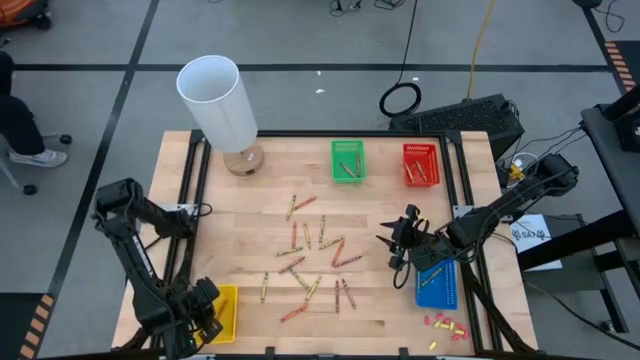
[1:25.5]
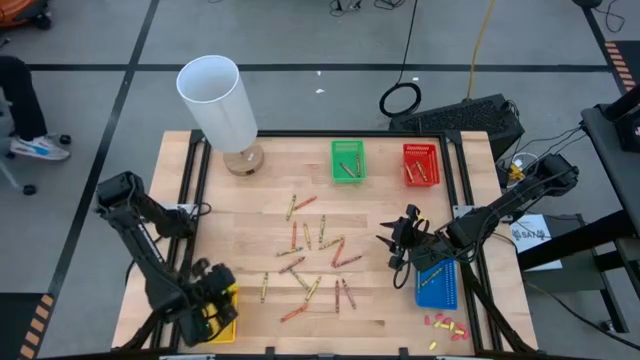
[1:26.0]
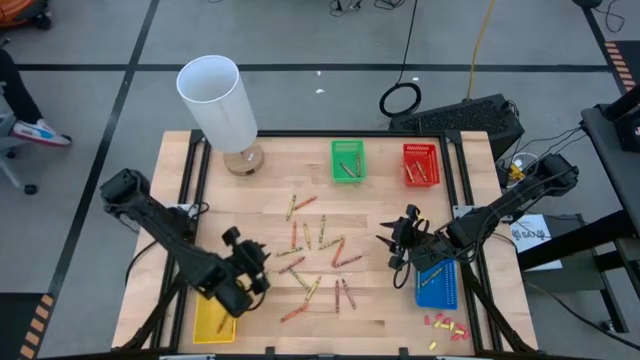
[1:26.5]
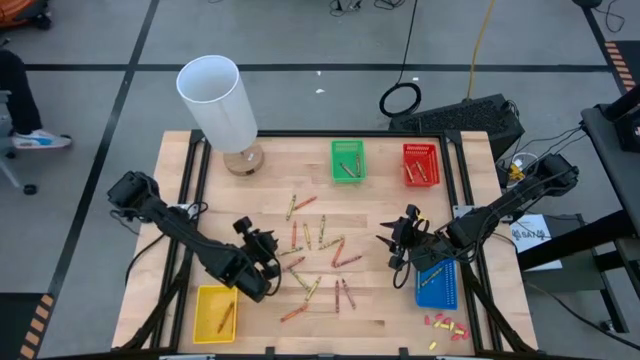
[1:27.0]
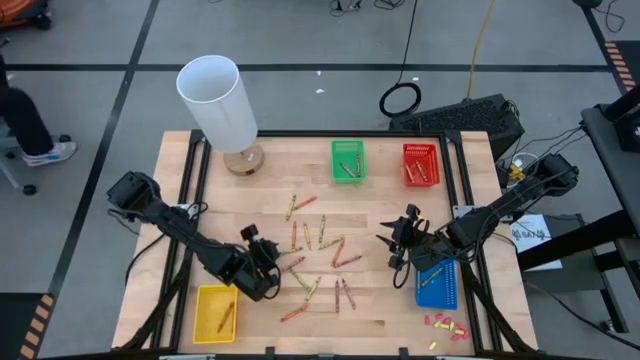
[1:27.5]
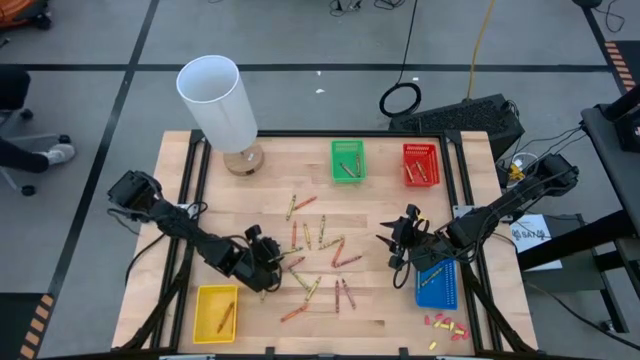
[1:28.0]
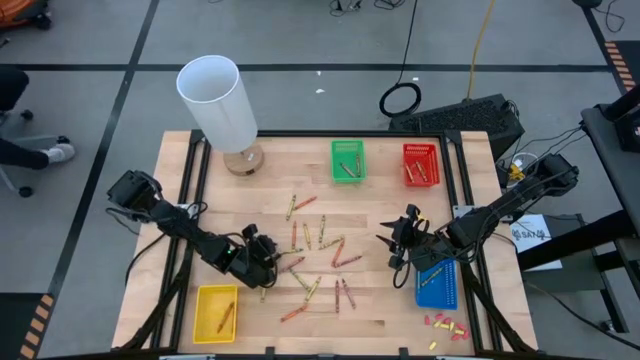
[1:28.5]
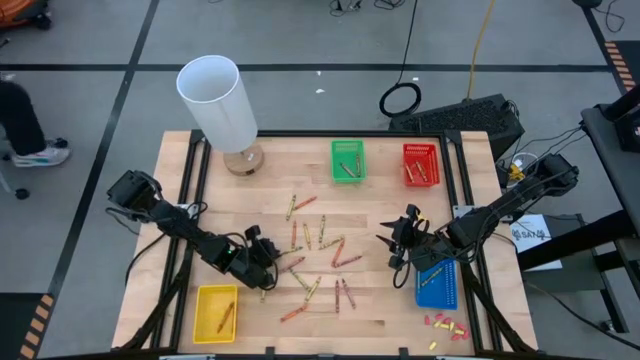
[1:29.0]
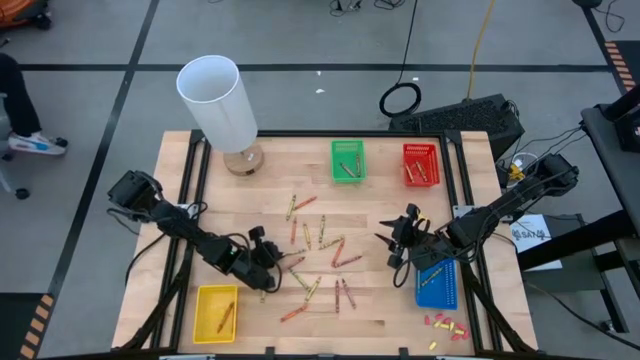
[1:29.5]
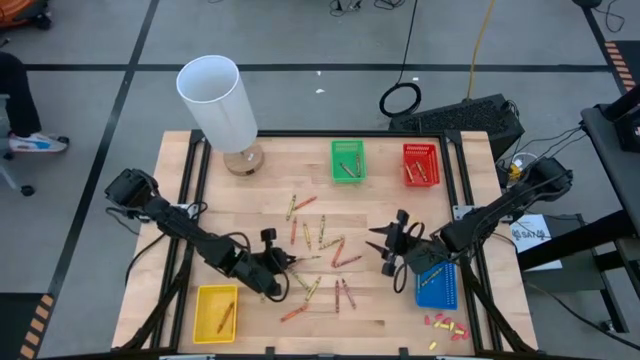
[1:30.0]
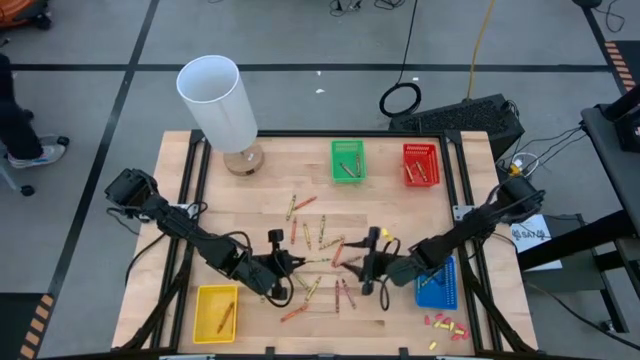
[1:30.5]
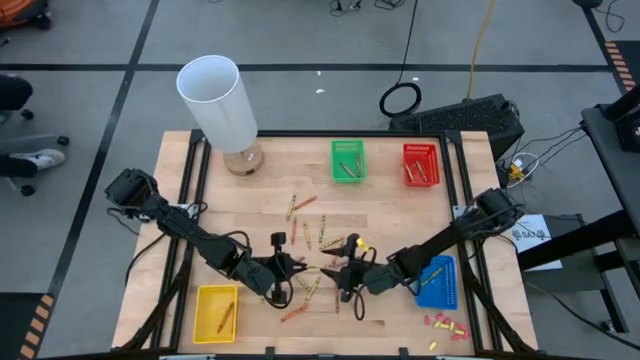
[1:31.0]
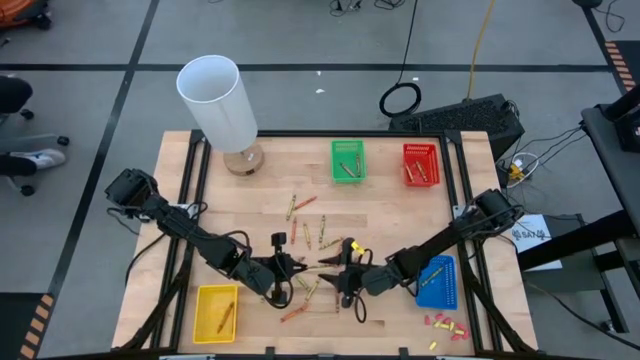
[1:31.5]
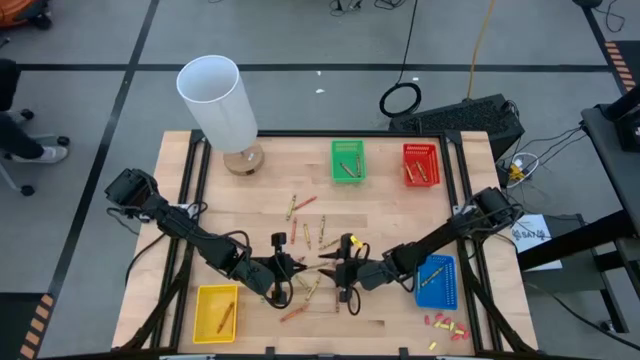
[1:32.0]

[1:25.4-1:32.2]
Task: Sort crayons
Put the green crayon into the red bin

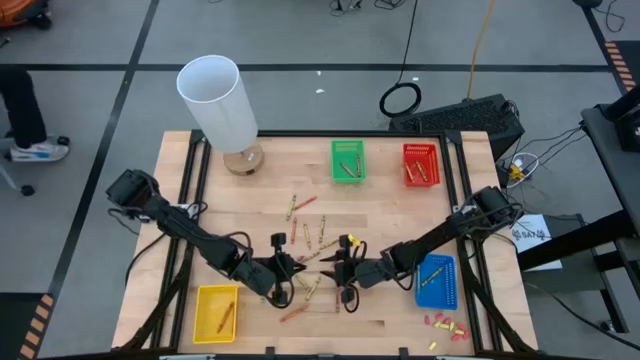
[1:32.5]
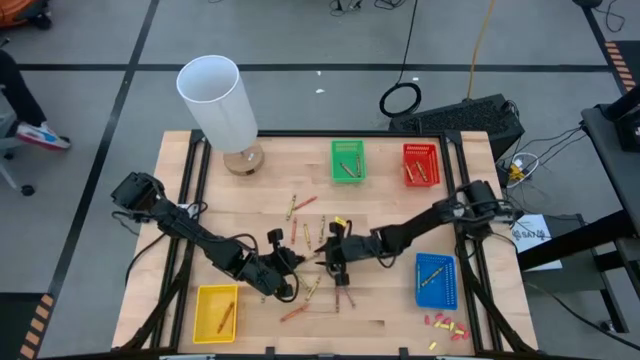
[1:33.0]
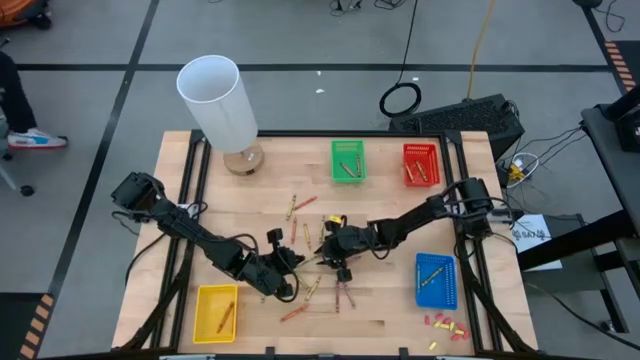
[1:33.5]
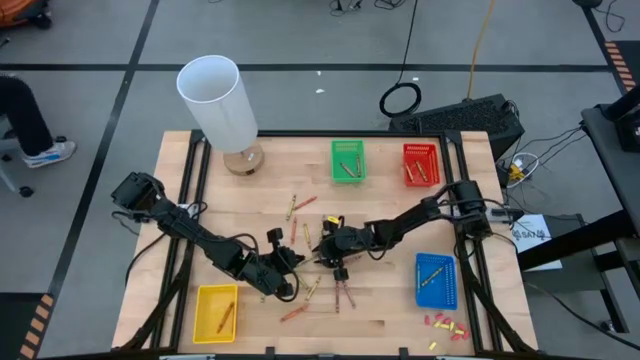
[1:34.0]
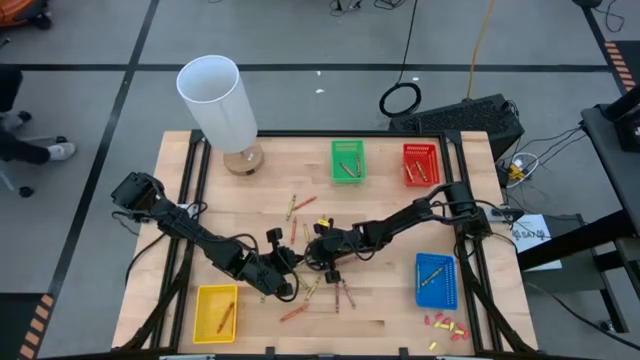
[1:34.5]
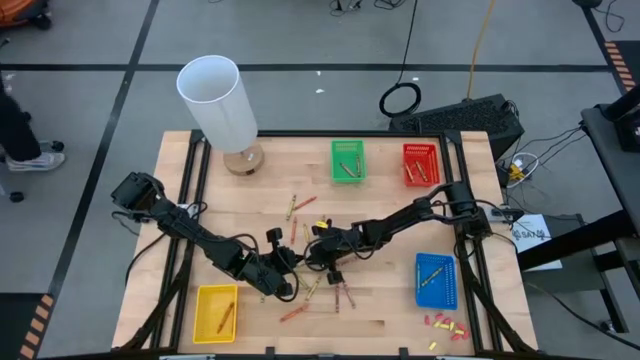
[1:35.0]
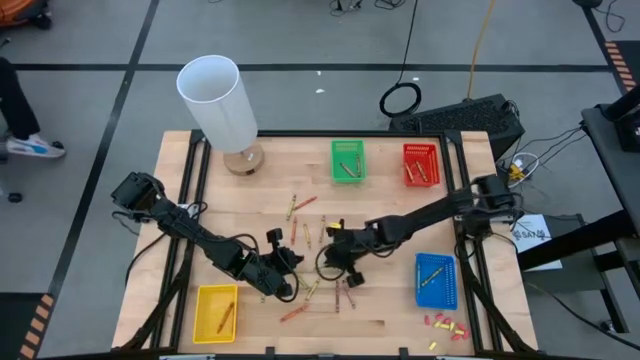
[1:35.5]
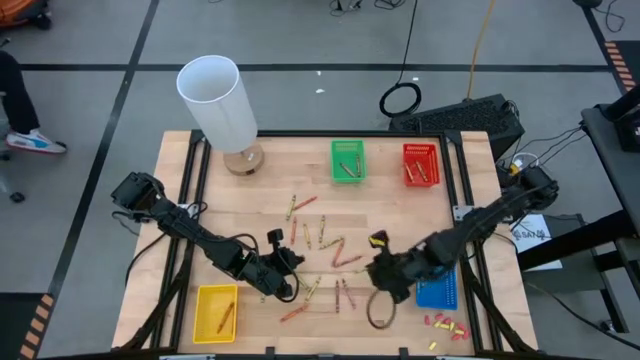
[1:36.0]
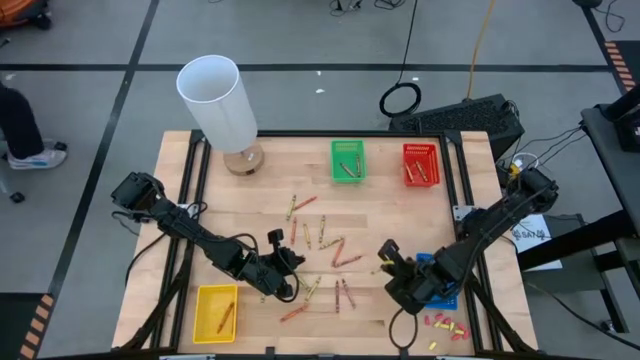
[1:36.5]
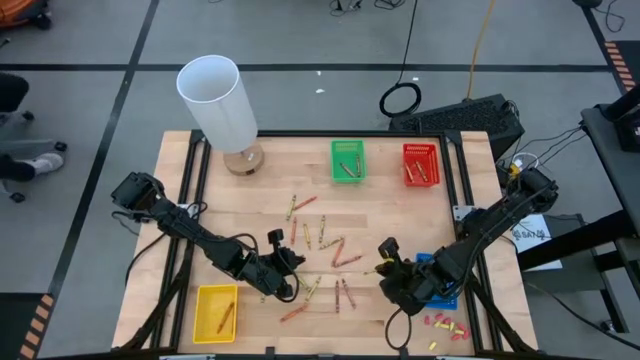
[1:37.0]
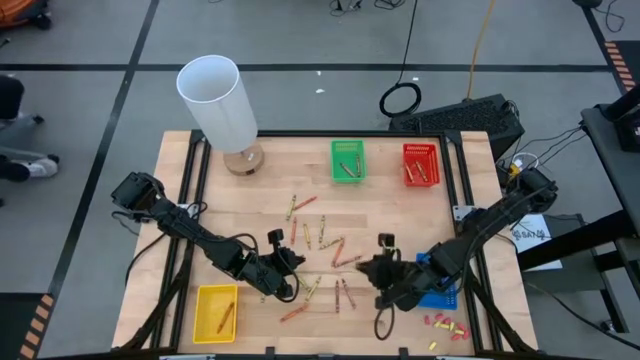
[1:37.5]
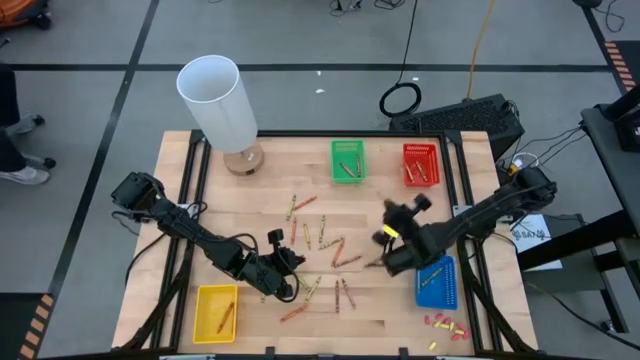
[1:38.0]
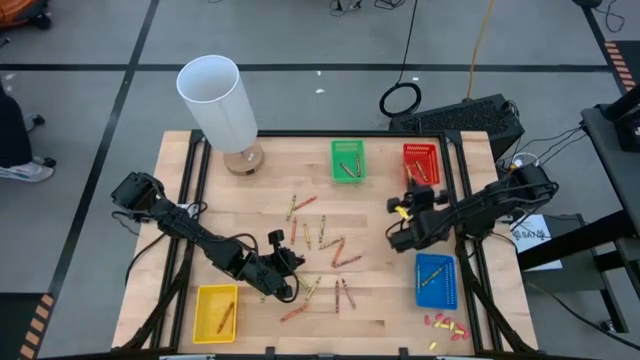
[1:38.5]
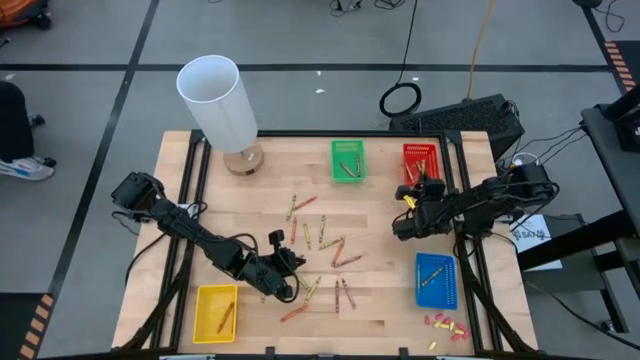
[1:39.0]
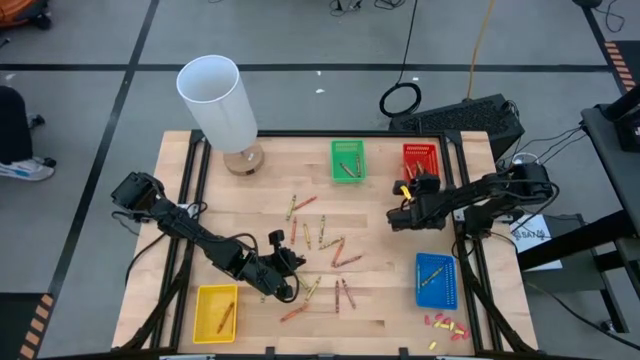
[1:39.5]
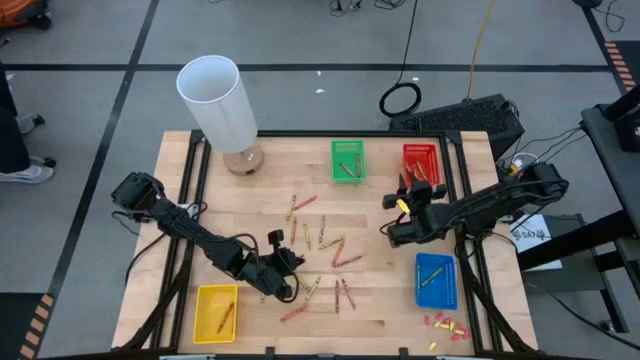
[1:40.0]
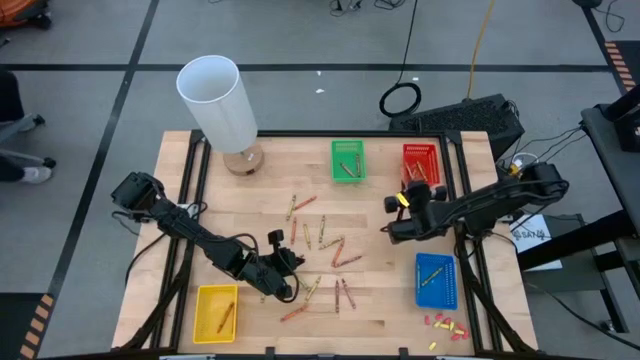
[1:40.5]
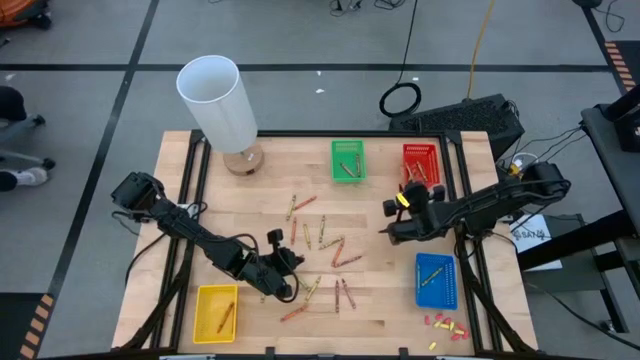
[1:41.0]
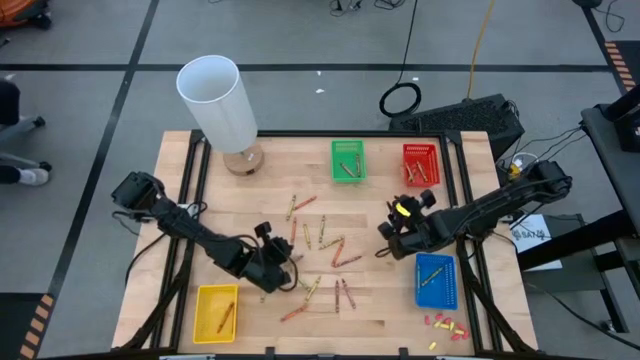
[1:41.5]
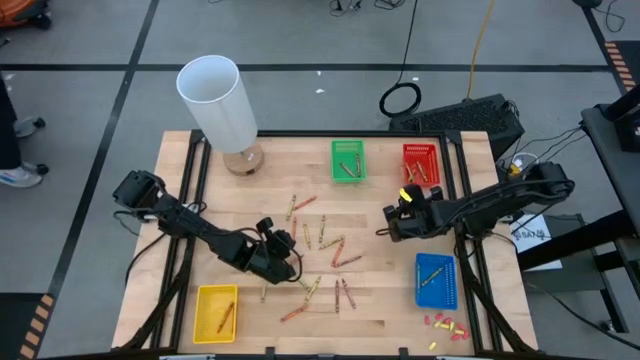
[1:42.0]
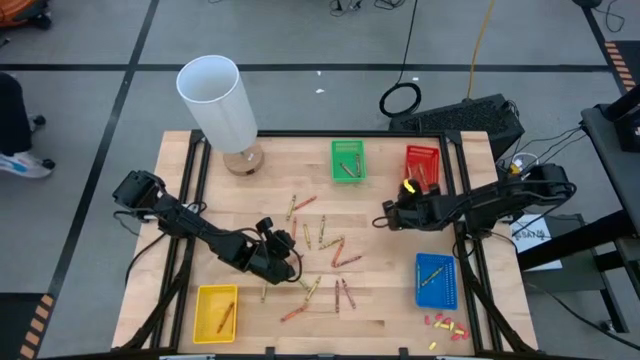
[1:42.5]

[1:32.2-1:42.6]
Put the green crayon into the red bin

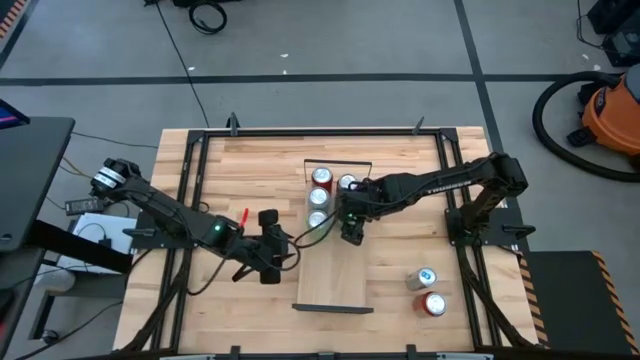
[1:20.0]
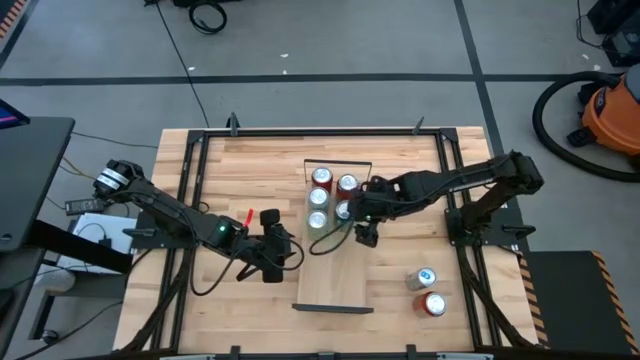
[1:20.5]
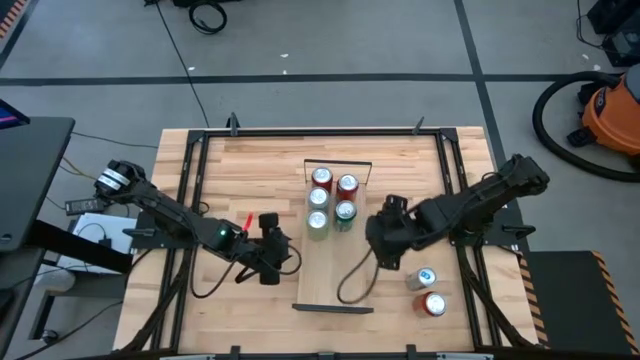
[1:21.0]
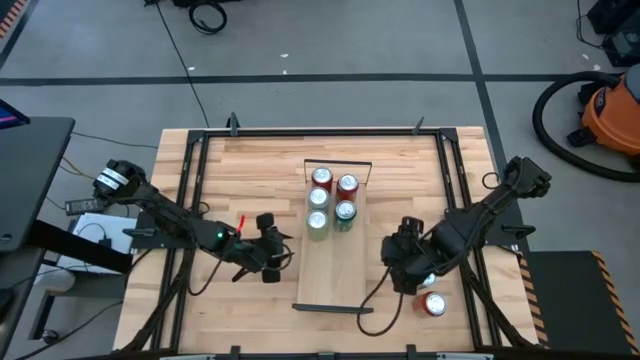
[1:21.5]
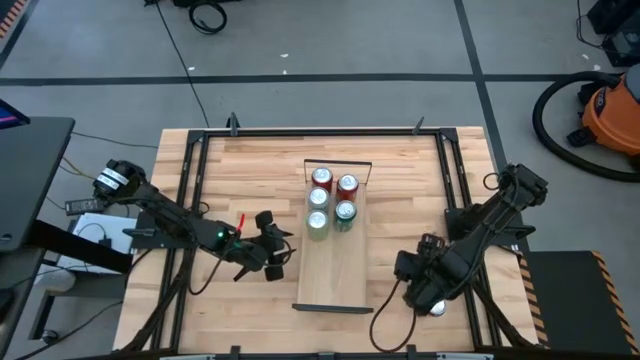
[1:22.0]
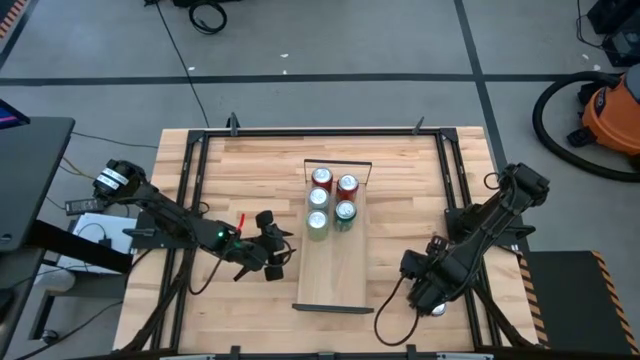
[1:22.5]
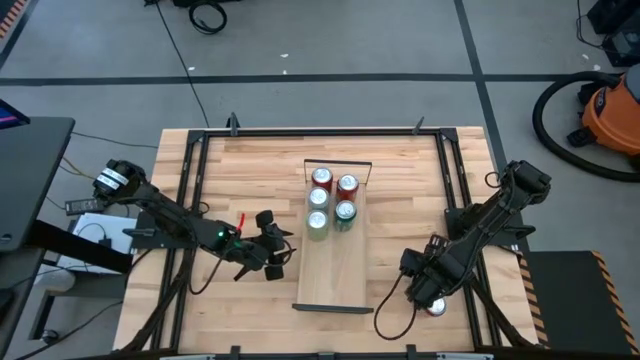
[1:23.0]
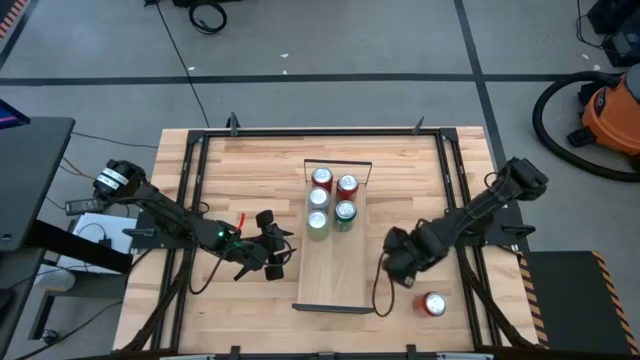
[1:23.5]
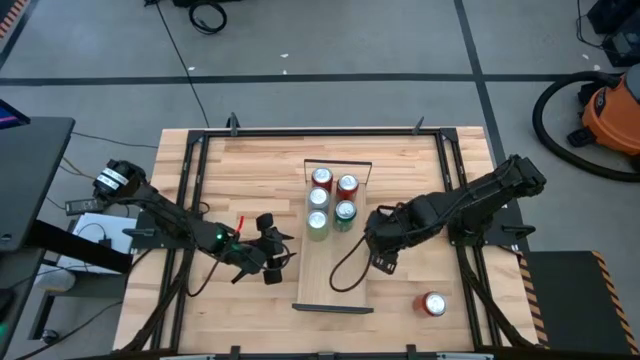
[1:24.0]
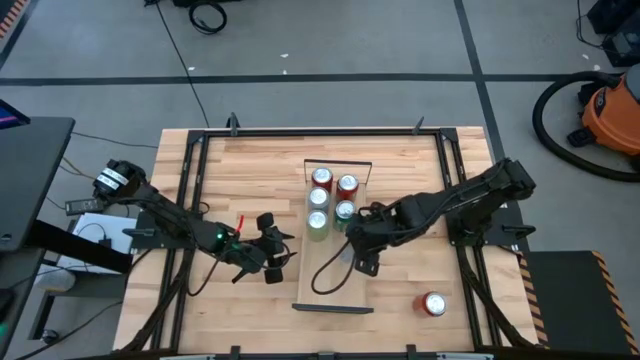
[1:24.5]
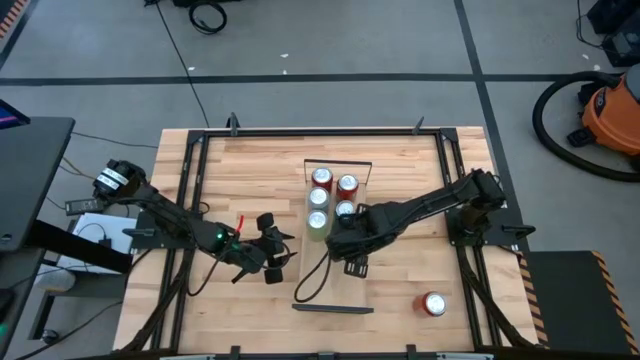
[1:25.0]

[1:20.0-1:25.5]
Task: Place canned beverage on shelf
Put thwhite/blue soda can on the shelf
